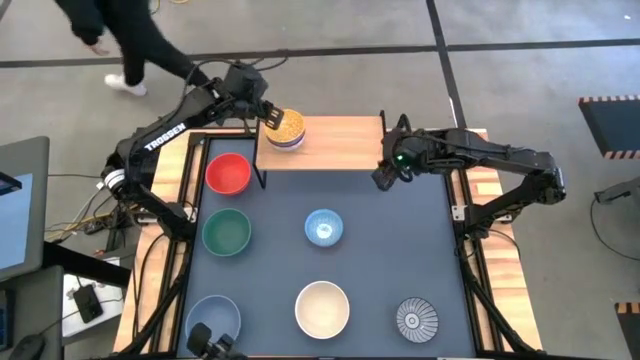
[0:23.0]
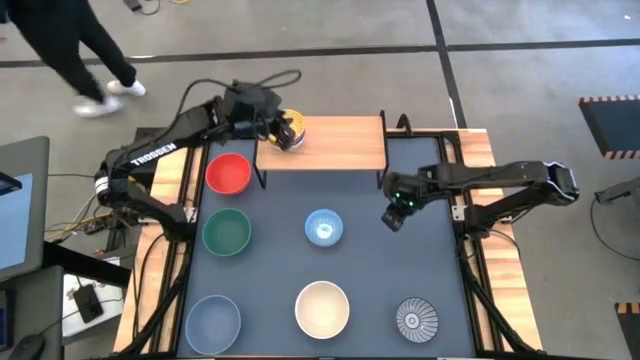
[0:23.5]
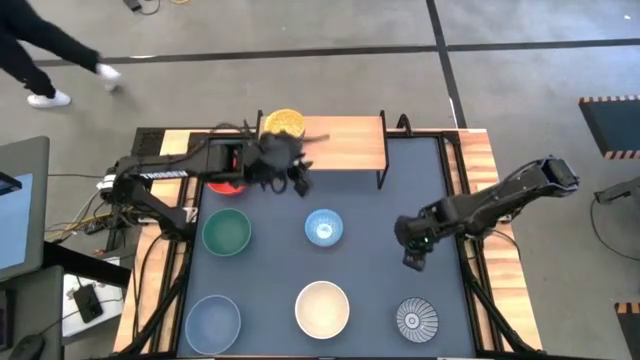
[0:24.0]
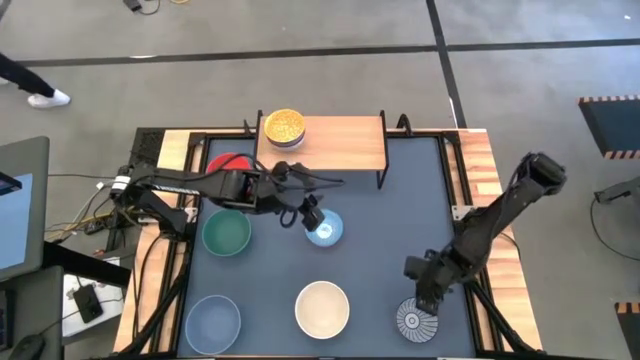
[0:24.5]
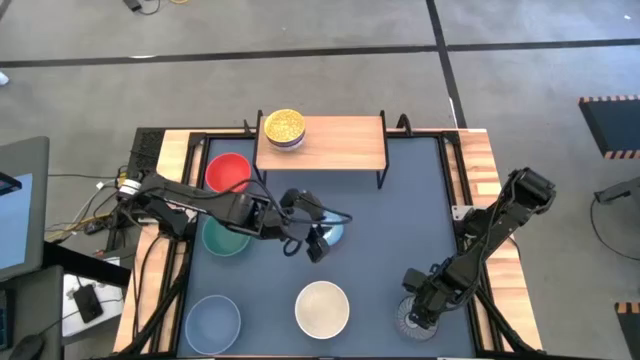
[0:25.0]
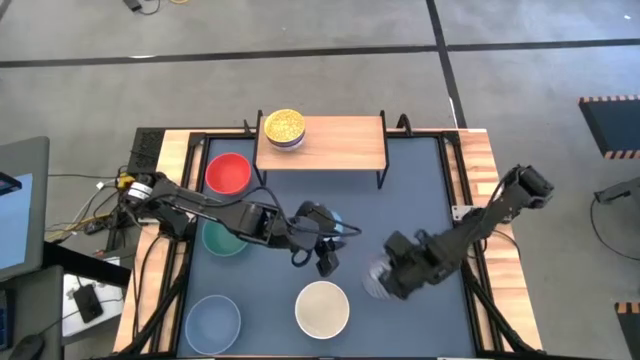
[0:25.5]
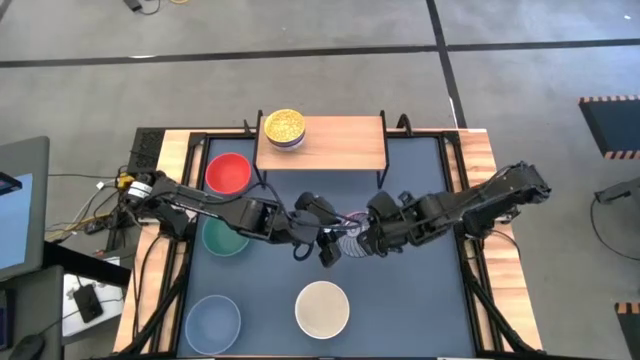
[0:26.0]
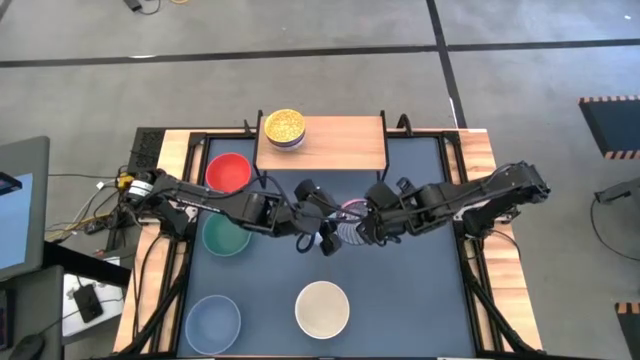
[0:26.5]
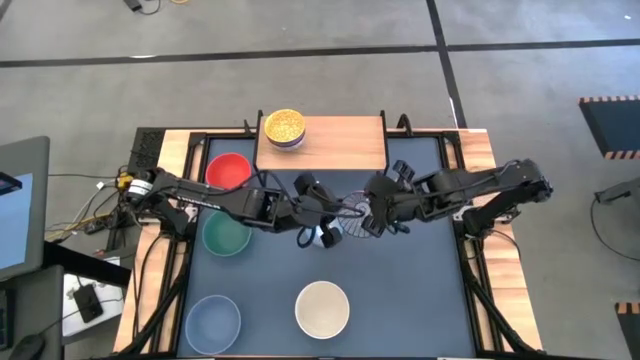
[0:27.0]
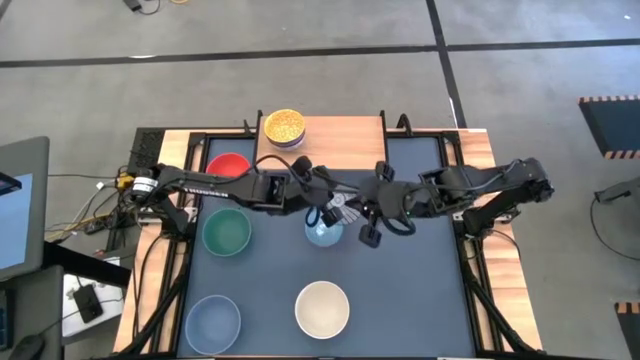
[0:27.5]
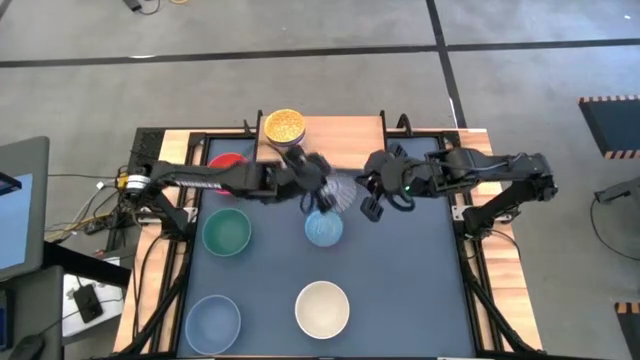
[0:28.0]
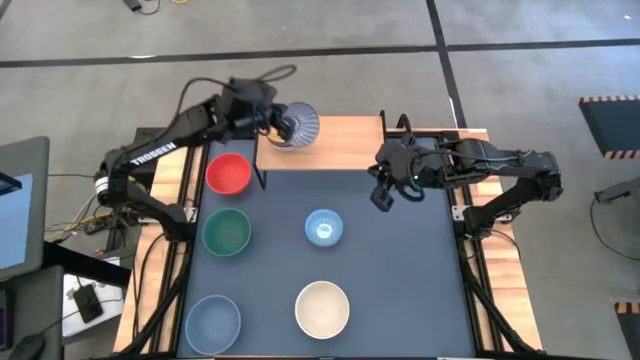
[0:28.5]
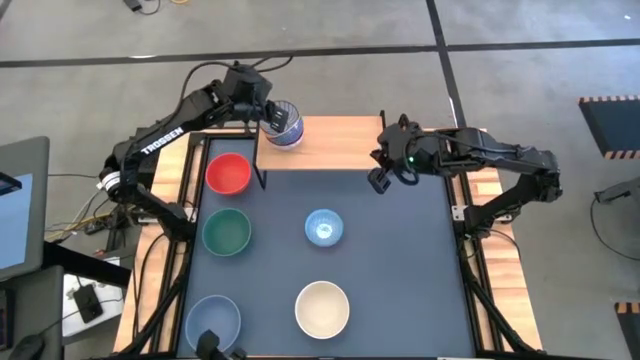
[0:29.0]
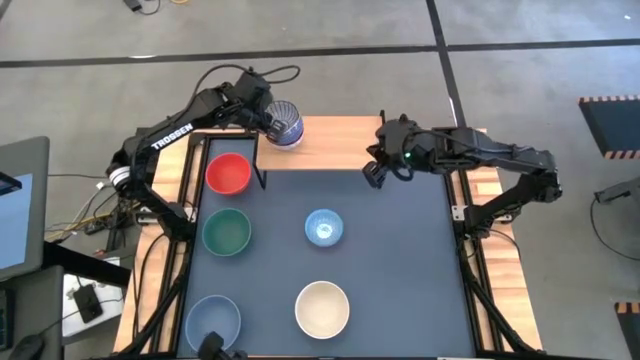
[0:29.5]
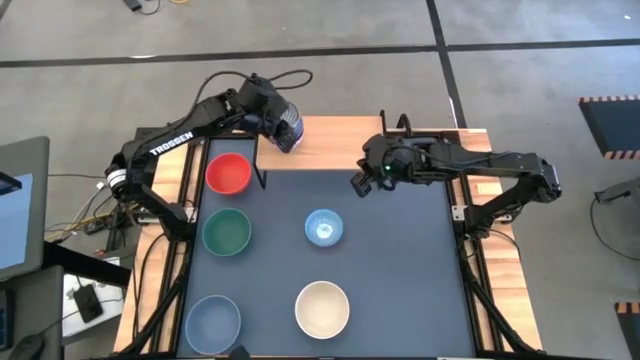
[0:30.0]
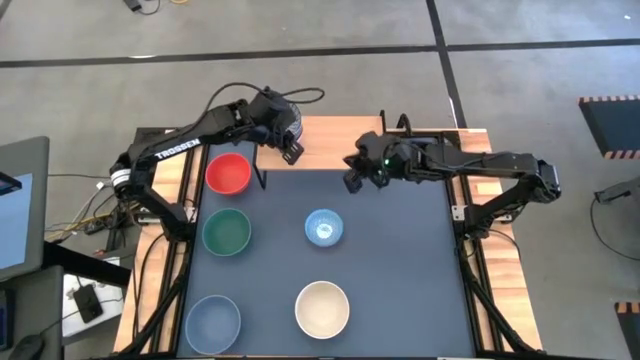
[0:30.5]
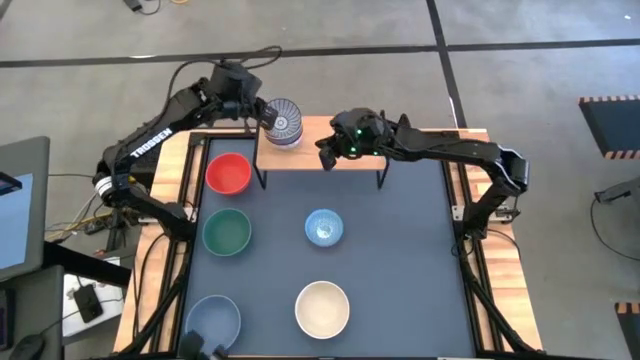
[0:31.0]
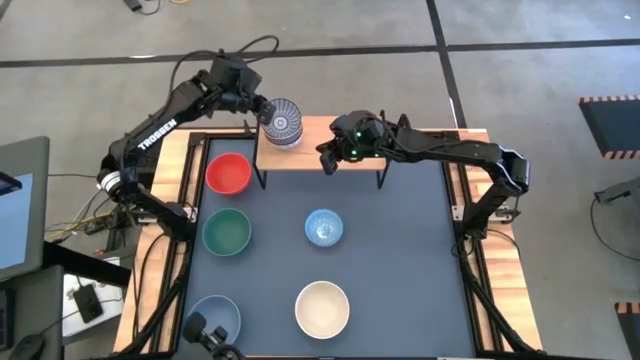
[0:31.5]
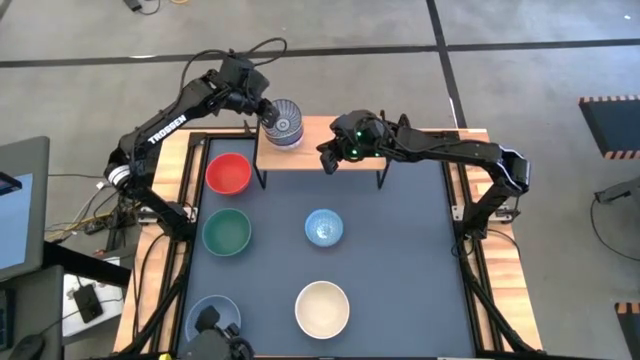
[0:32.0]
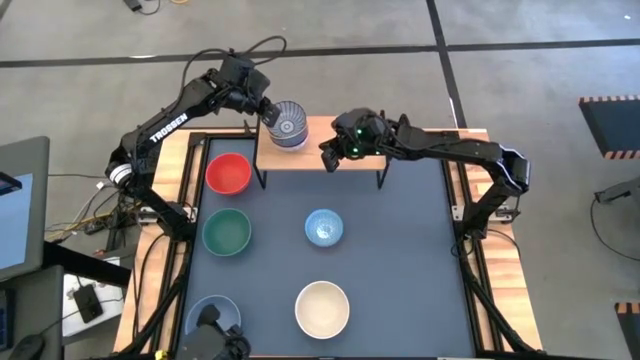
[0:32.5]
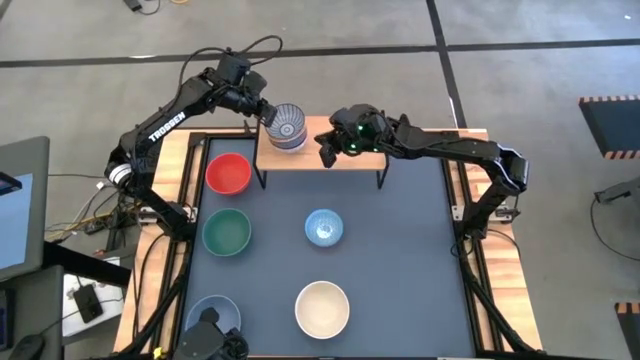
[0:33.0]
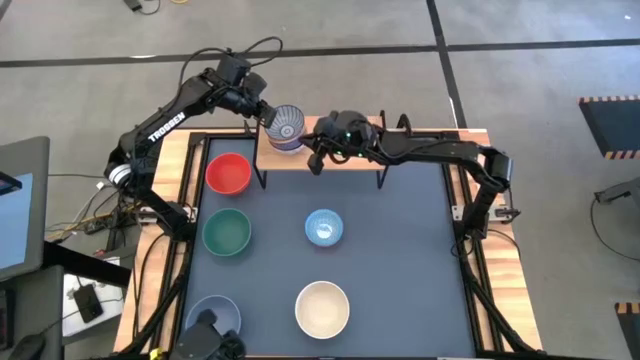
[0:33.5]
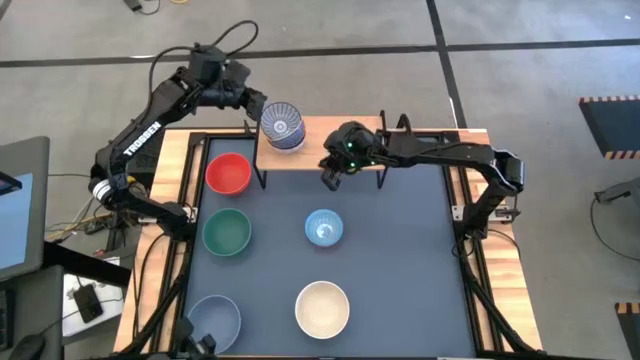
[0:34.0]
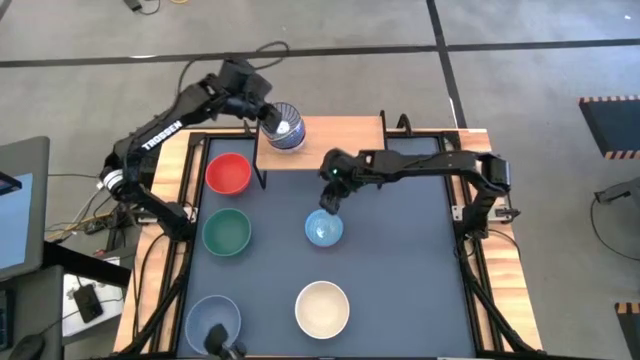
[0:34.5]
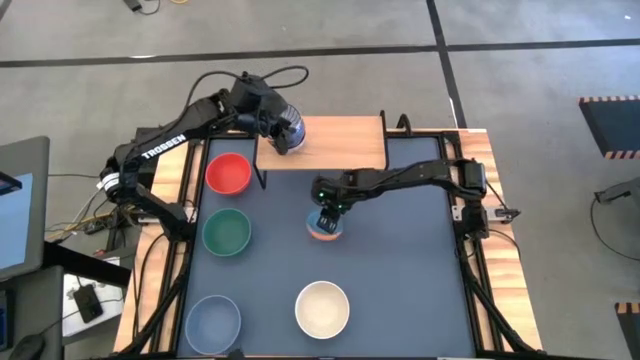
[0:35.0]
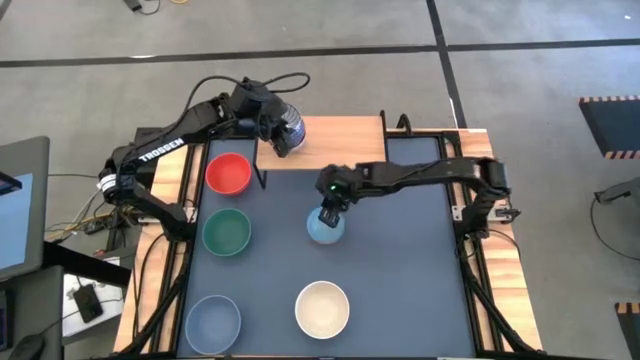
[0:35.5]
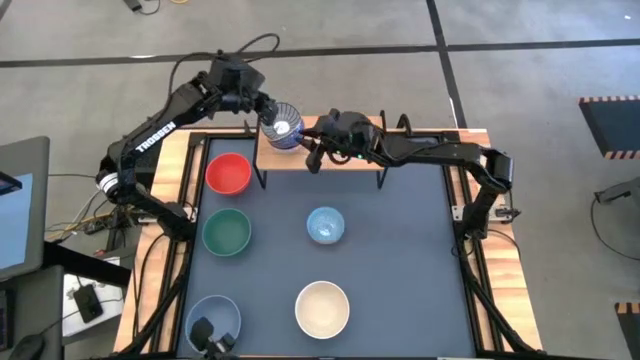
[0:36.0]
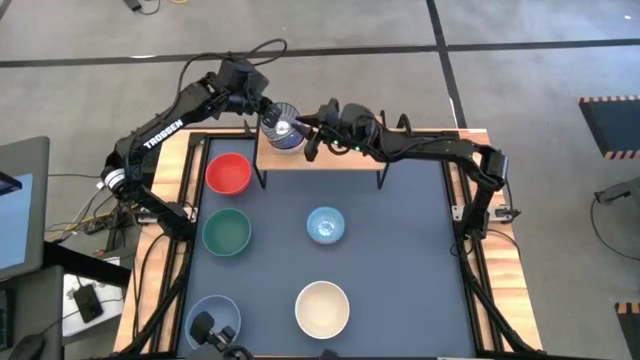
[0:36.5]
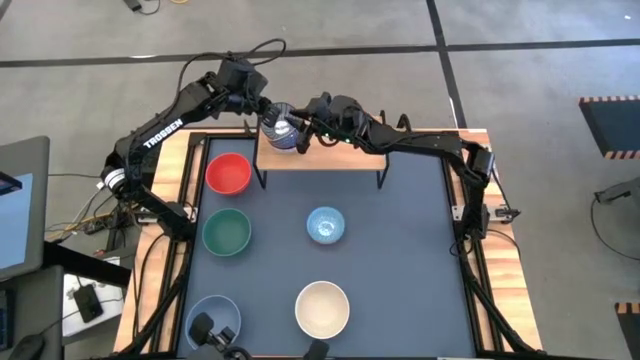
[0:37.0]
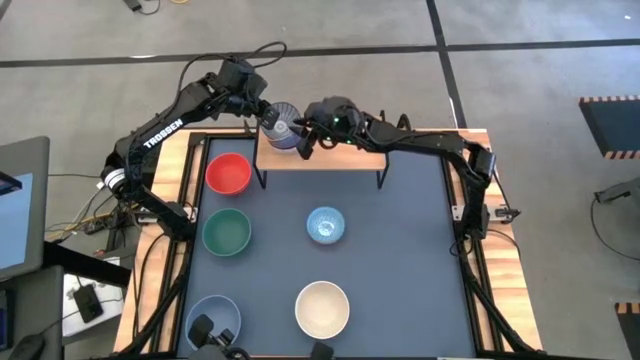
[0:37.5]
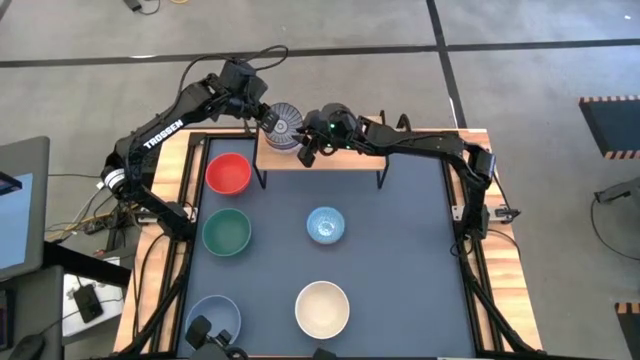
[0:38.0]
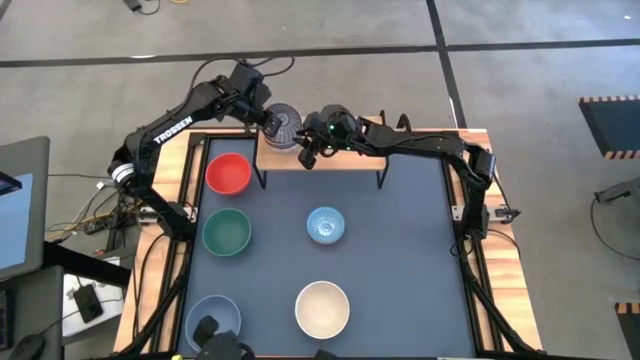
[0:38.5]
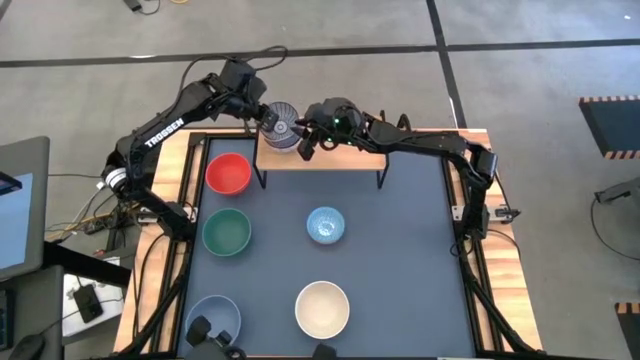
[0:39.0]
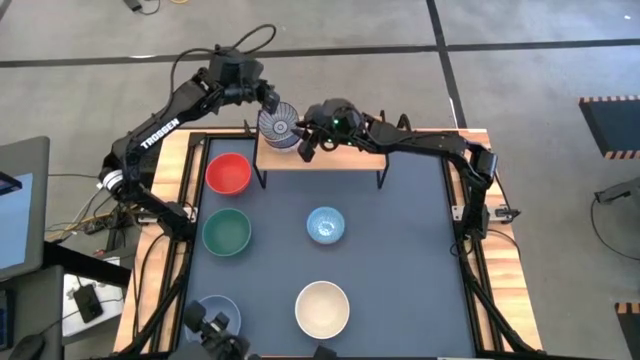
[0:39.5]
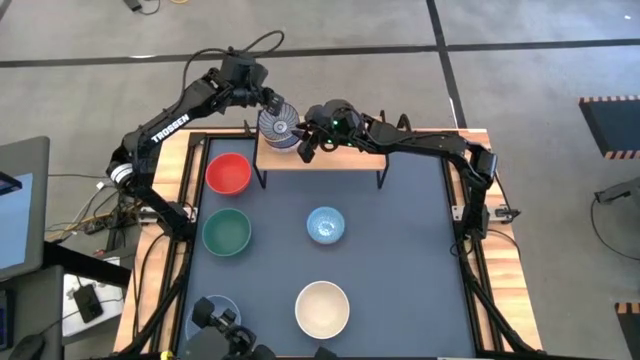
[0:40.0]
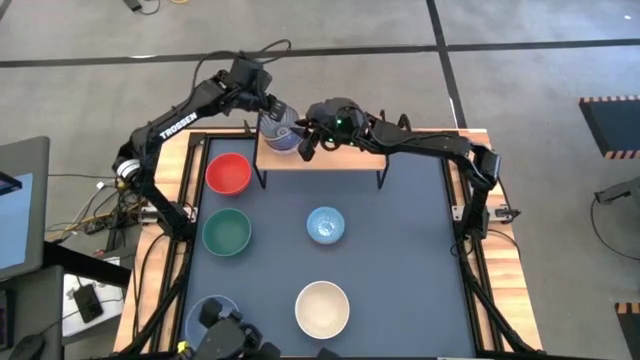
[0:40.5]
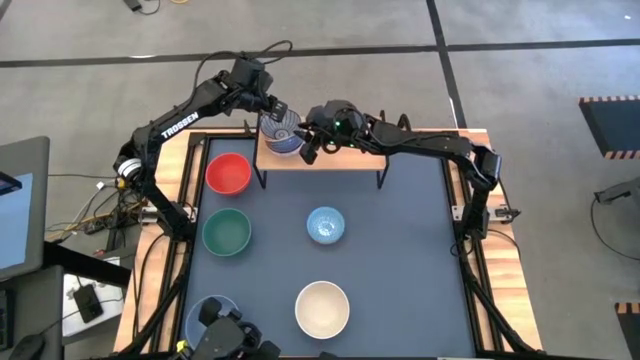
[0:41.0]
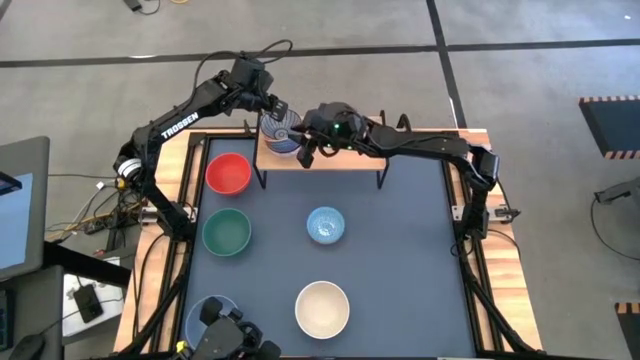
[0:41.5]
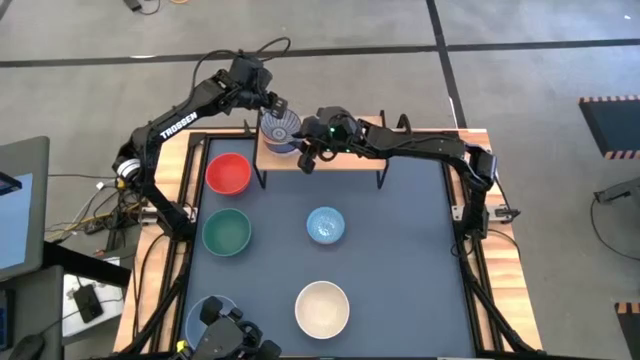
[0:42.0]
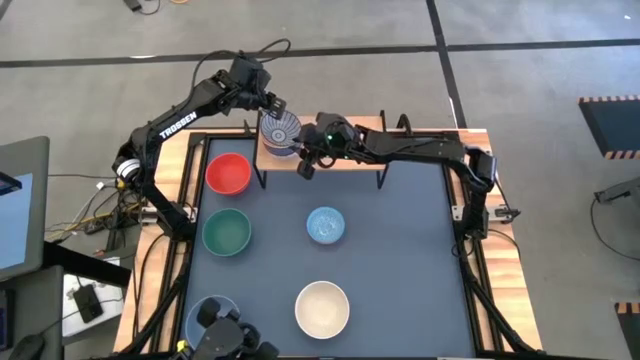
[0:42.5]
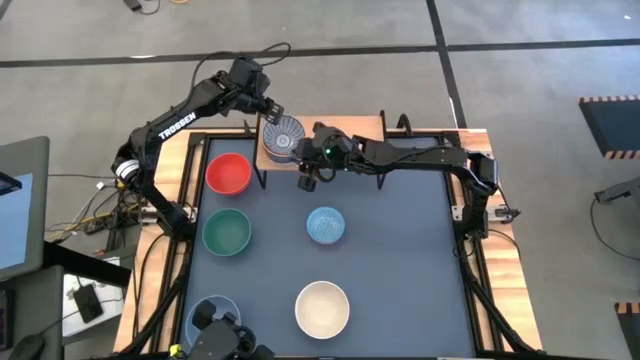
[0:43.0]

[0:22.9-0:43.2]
Task: Place and stack bowls onto a shelf
Stack the blue patterned white bowl on the top of the yellow patterned bowl on the shelf

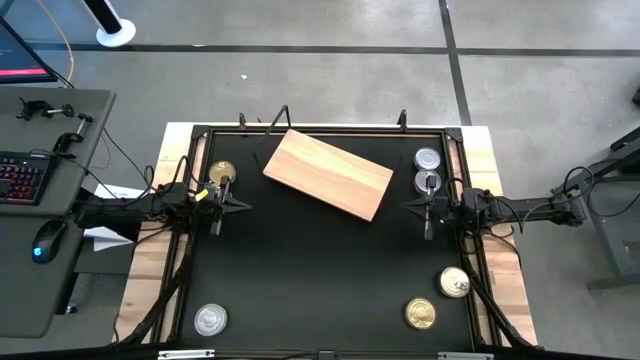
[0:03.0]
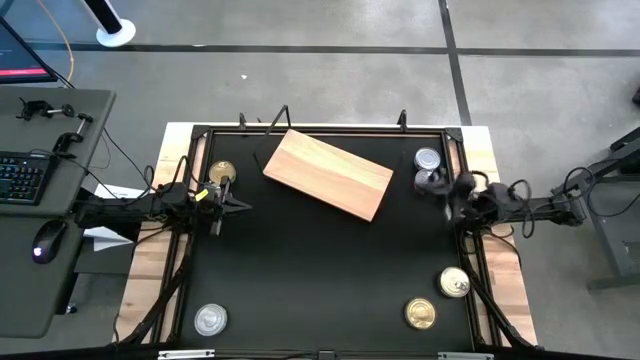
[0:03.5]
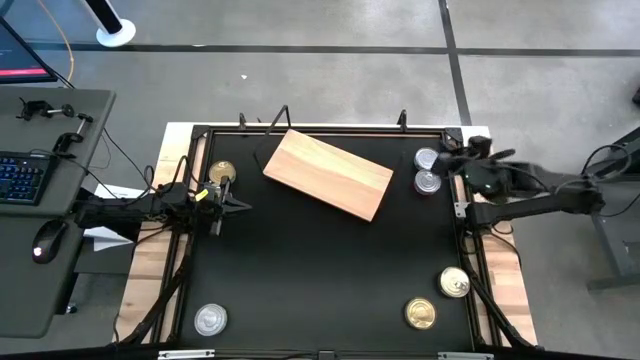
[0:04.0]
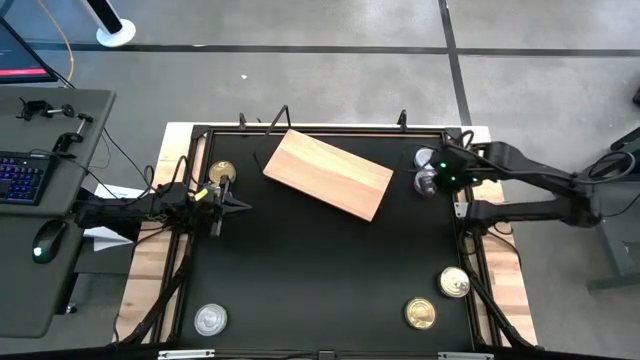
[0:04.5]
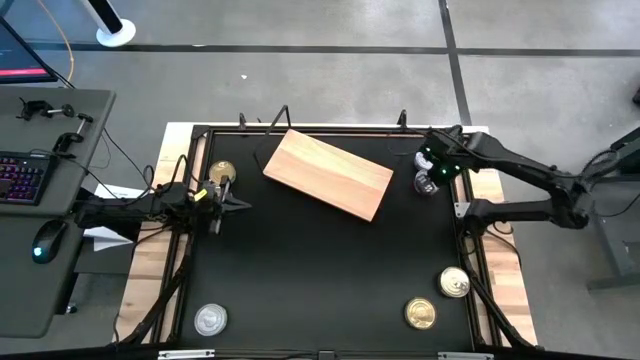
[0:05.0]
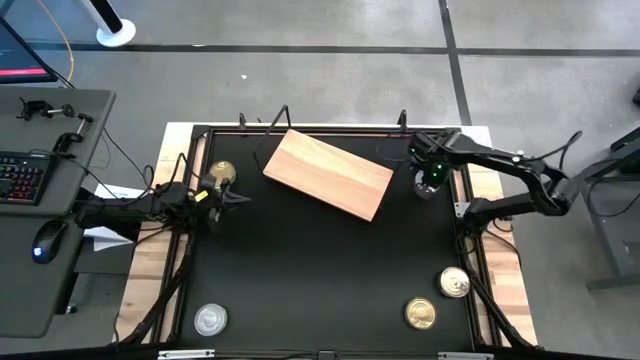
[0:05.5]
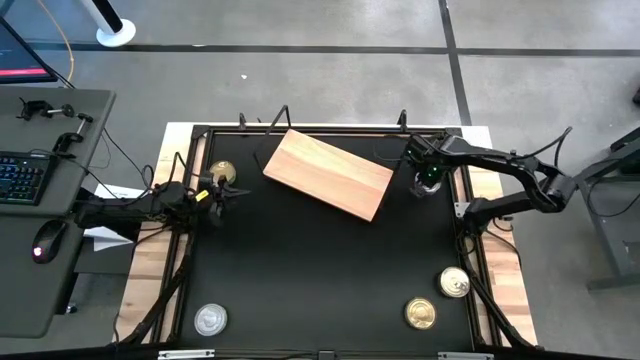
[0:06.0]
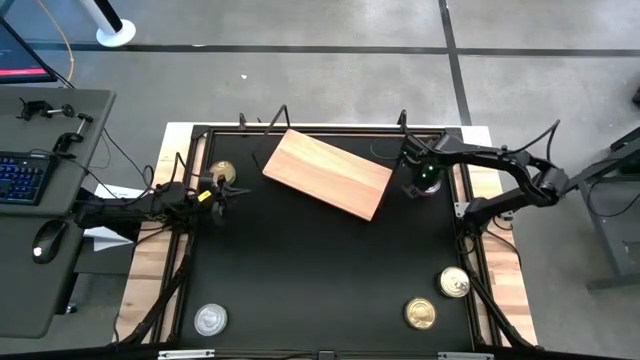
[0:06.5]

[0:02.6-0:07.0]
Task: Stack canned seafood by type on shelf
Put the red tuna can on the shelf
